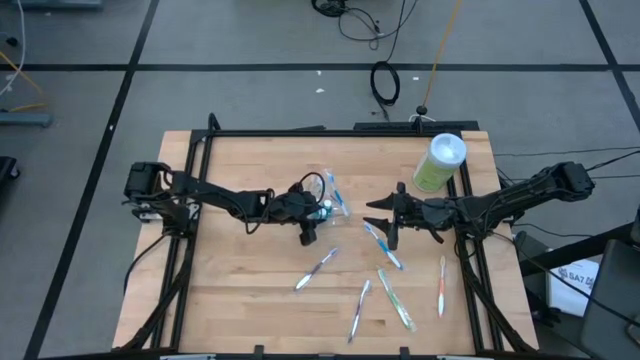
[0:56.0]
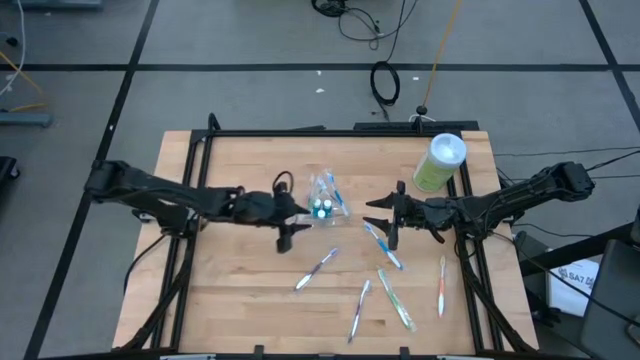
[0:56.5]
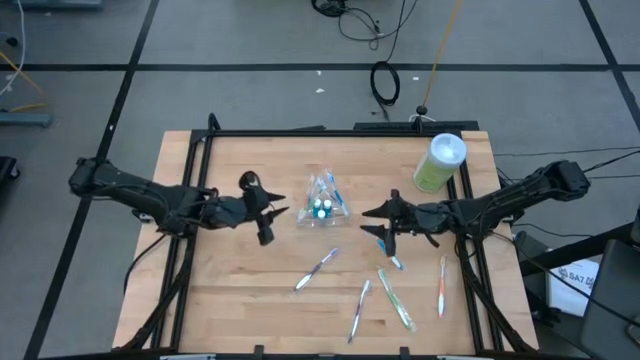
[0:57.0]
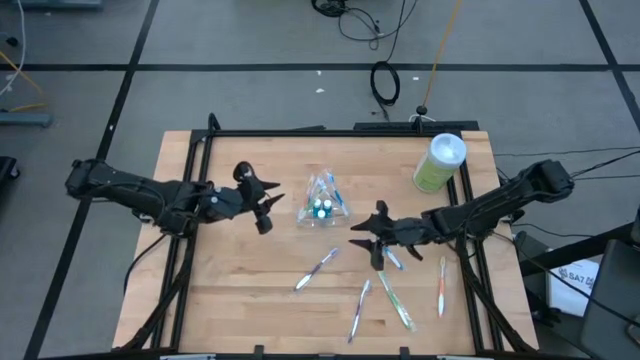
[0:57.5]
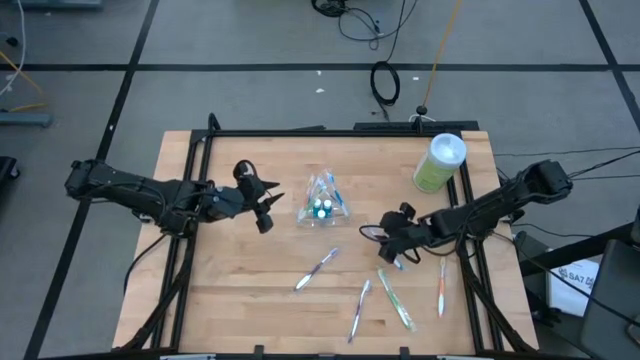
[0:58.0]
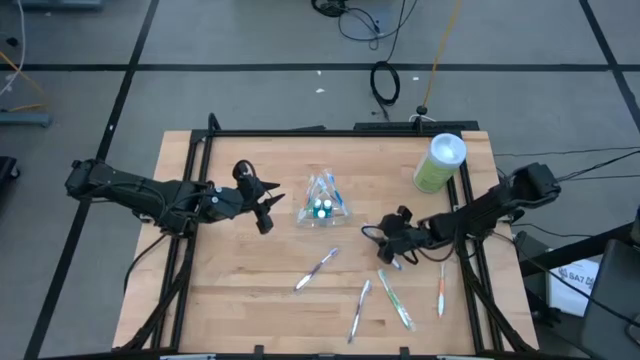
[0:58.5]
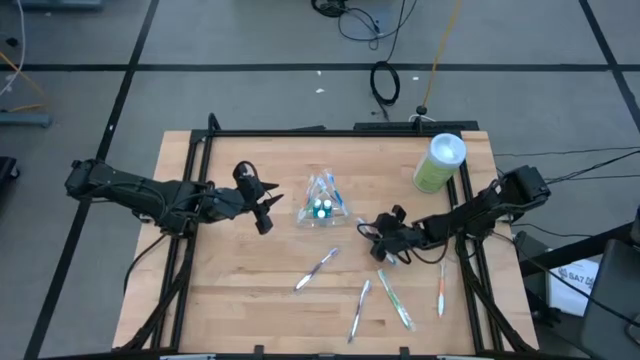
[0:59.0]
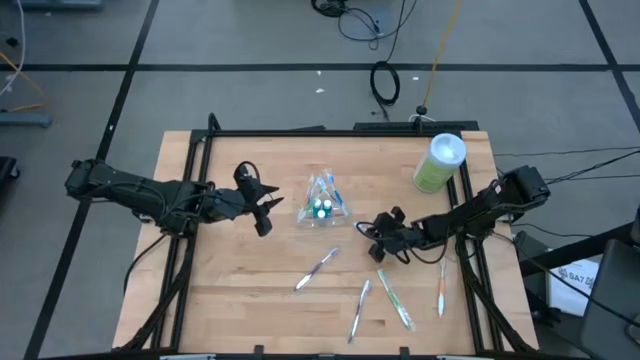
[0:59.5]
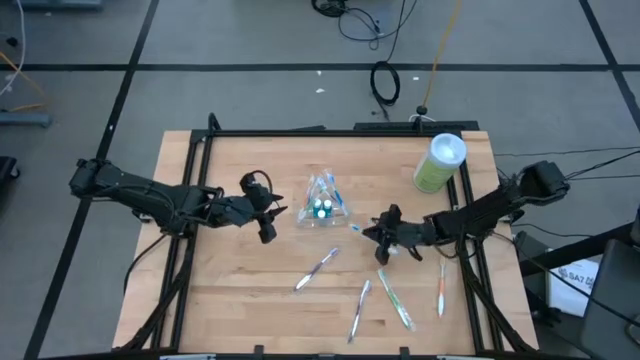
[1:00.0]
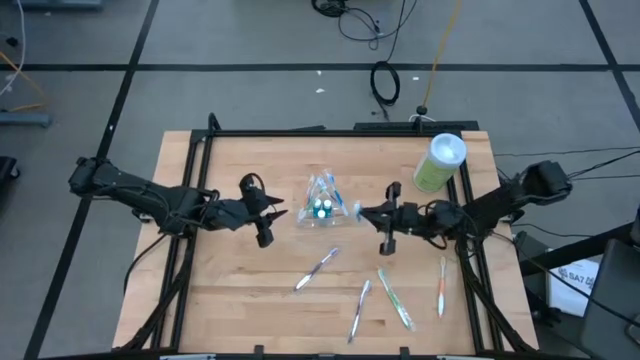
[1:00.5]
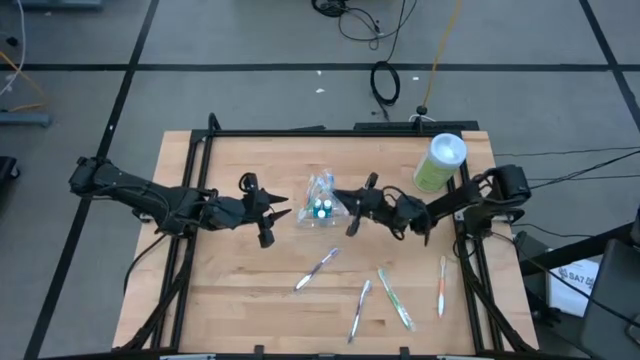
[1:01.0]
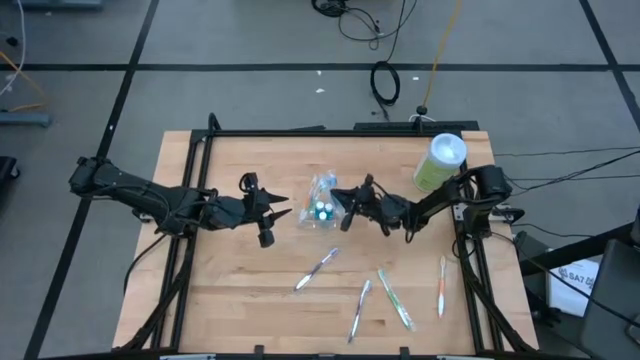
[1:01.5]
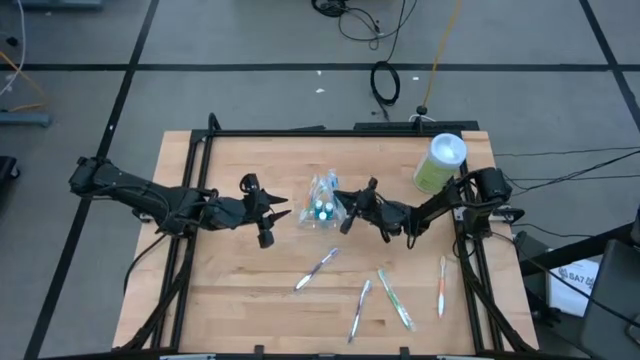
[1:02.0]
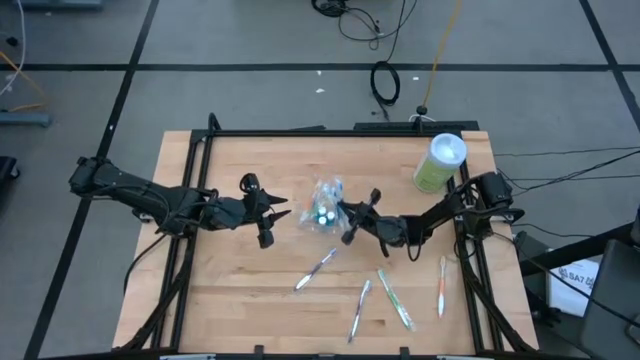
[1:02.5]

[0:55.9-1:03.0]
Task: Pick & Place toothbrushing station
Put the blue toothbrush into the transparent organizer

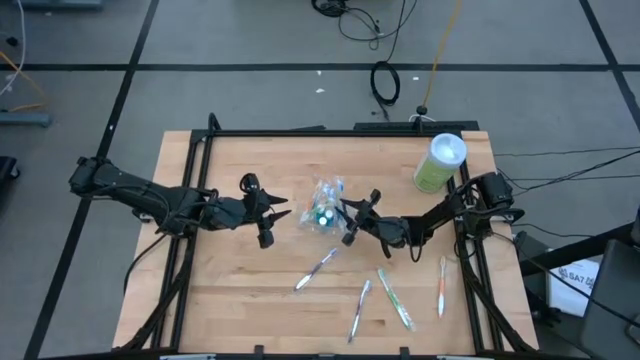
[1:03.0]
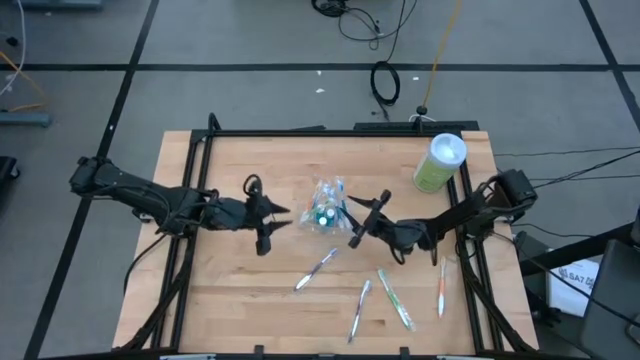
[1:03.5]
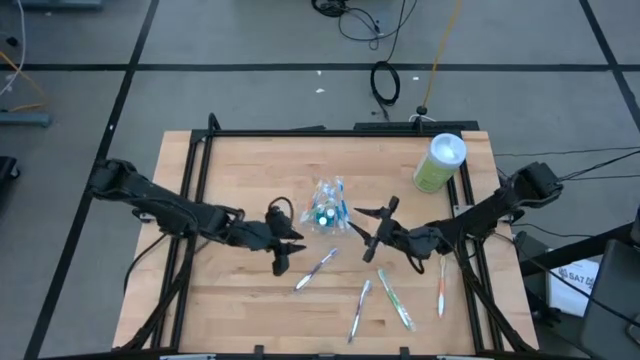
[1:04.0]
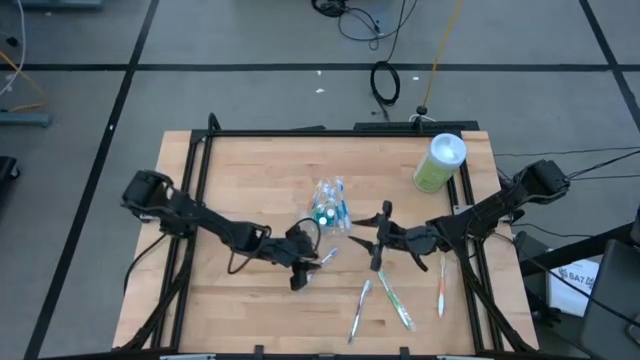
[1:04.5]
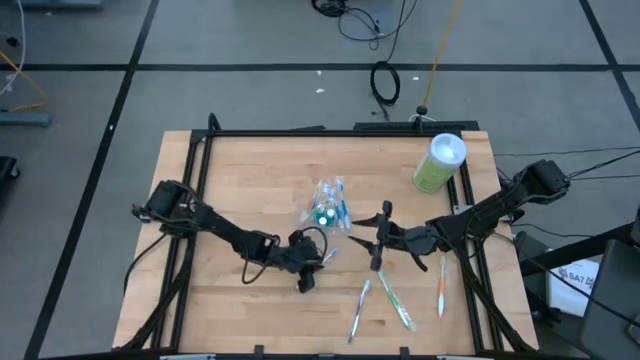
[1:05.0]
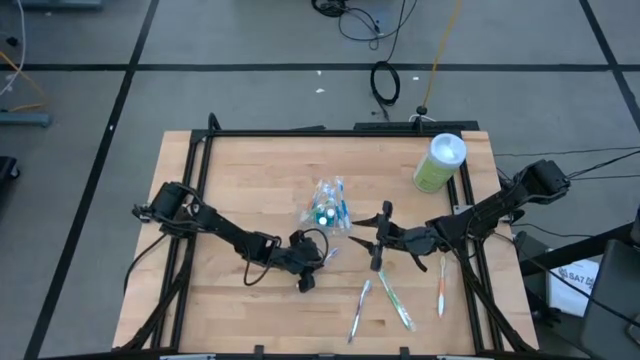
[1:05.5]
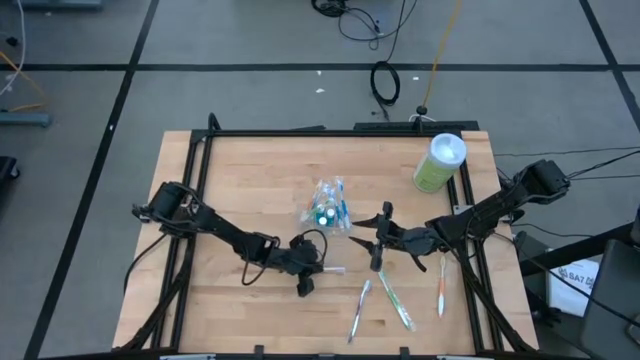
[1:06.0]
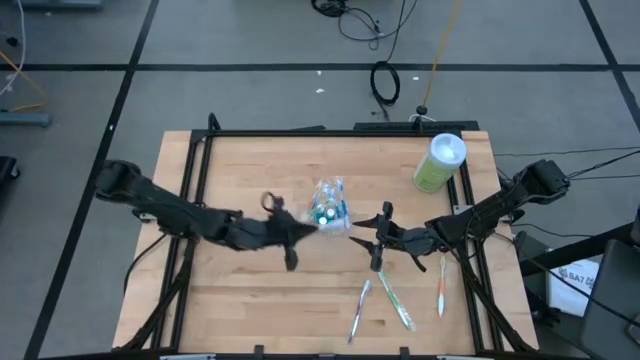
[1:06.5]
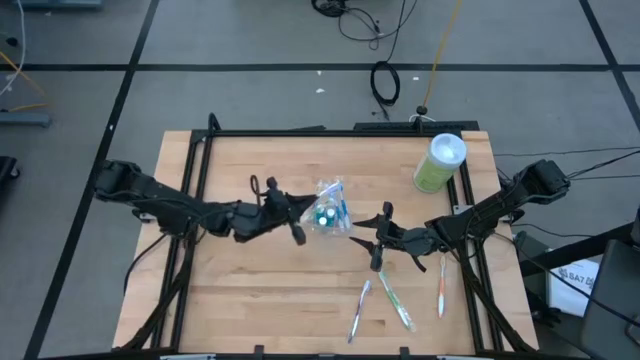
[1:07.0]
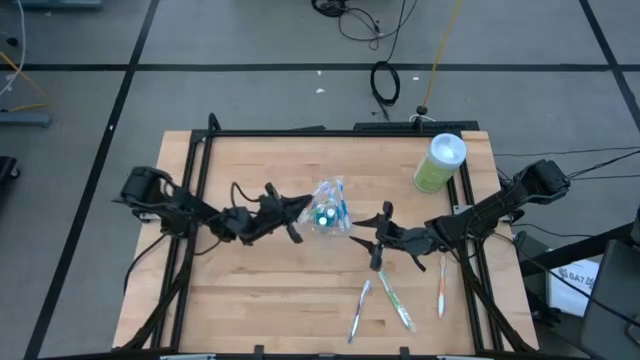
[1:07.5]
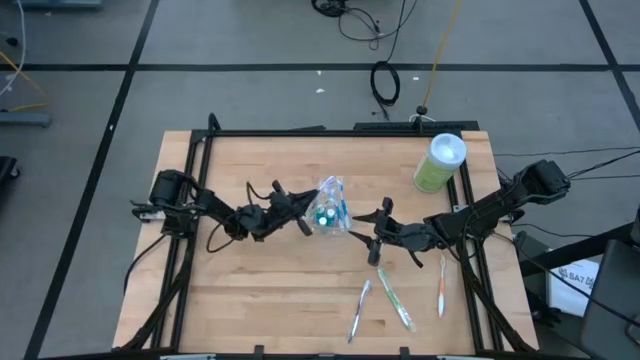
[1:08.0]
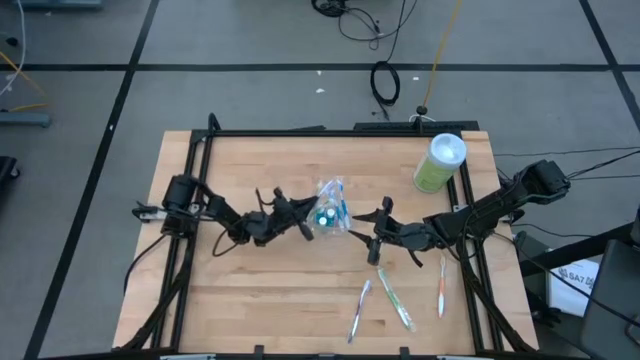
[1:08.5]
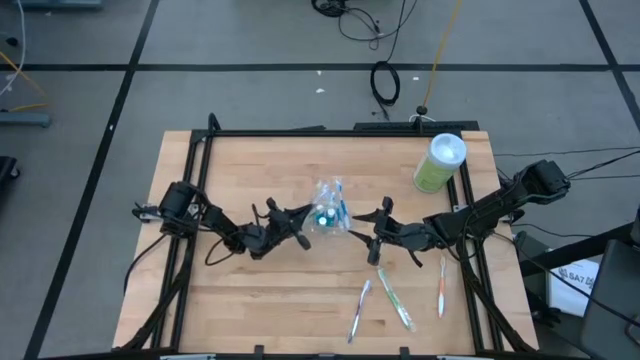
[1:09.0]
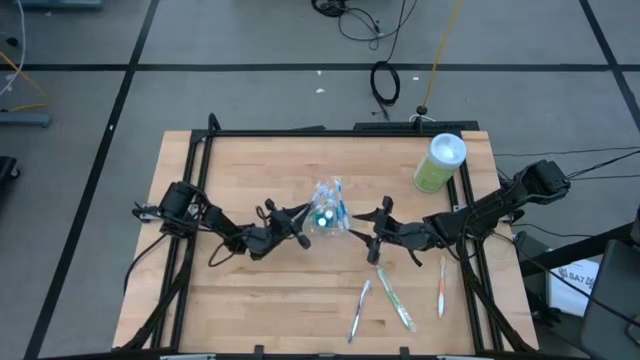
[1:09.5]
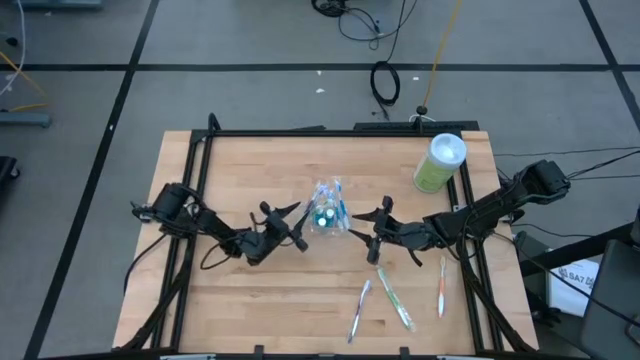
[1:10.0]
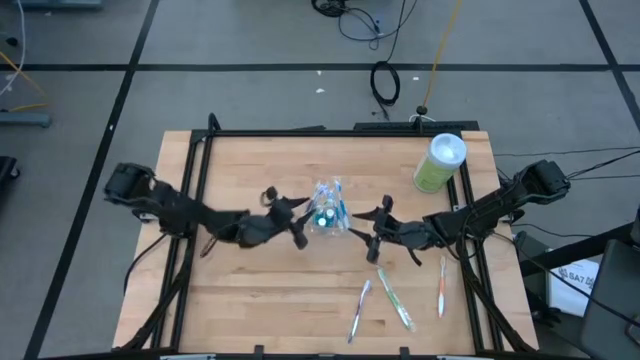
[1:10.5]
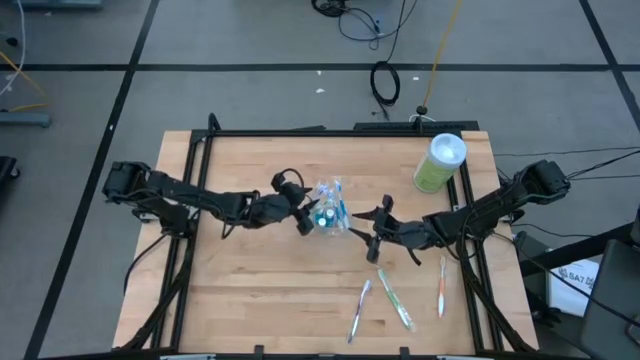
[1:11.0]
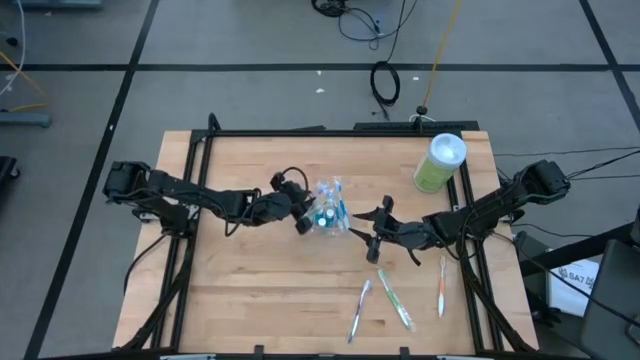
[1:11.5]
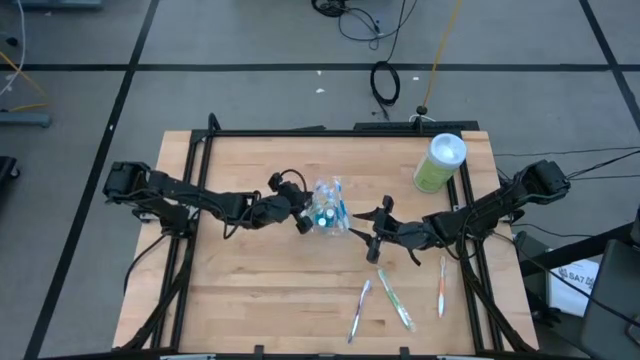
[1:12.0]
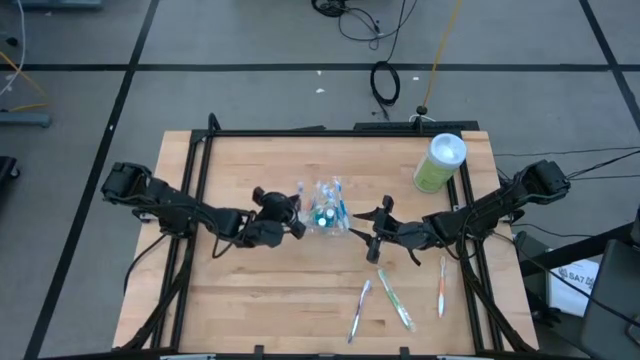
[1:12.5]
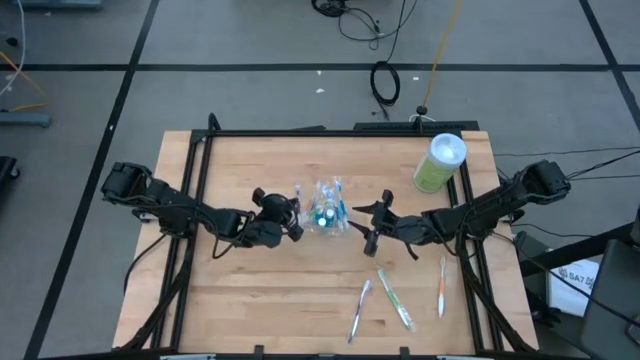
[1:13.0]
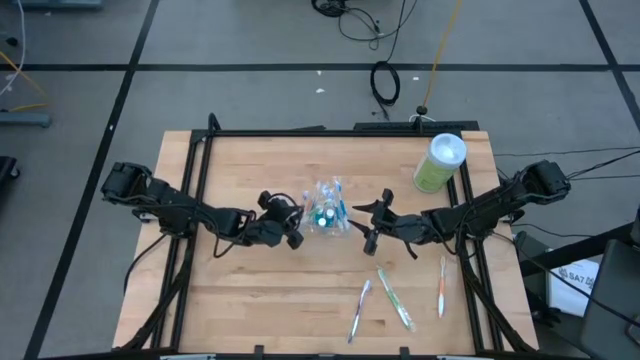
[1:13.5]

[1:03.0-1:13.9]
Put the top purple toothbrush into the transparent organizer

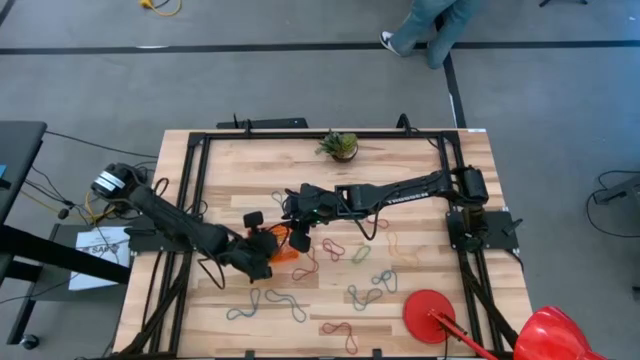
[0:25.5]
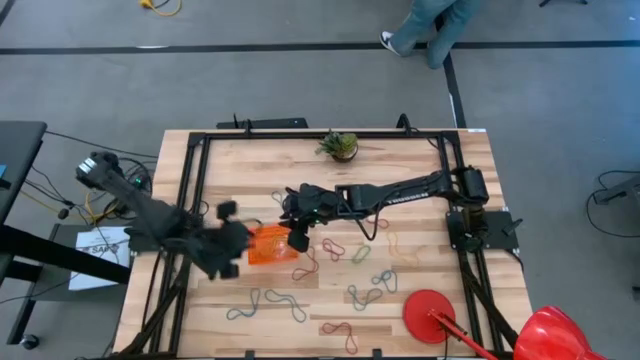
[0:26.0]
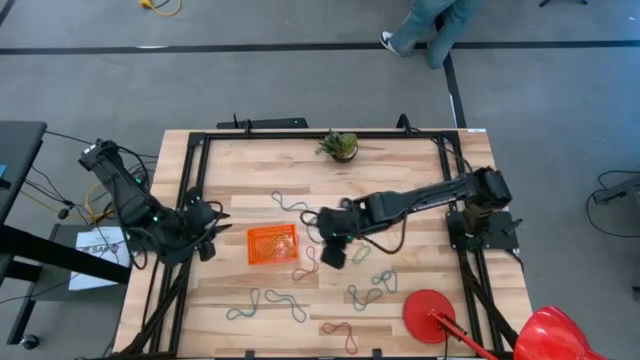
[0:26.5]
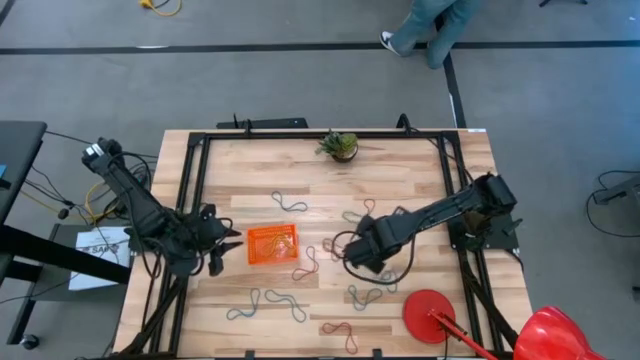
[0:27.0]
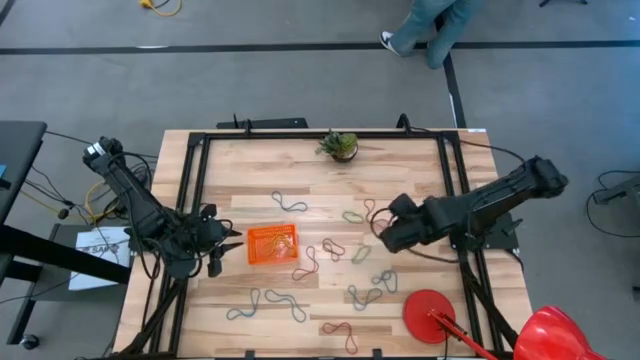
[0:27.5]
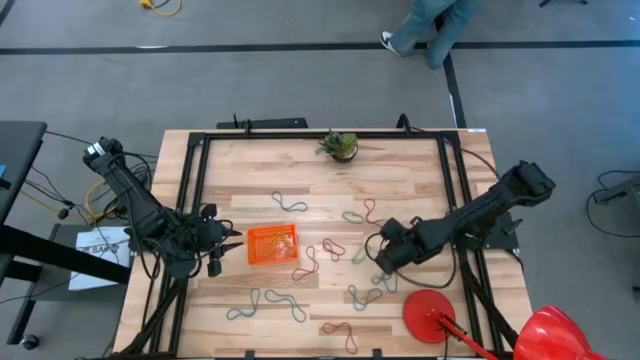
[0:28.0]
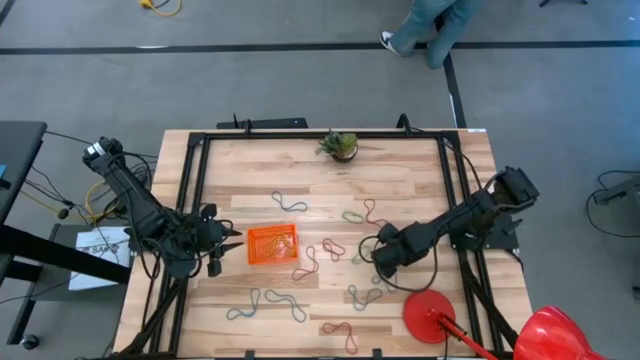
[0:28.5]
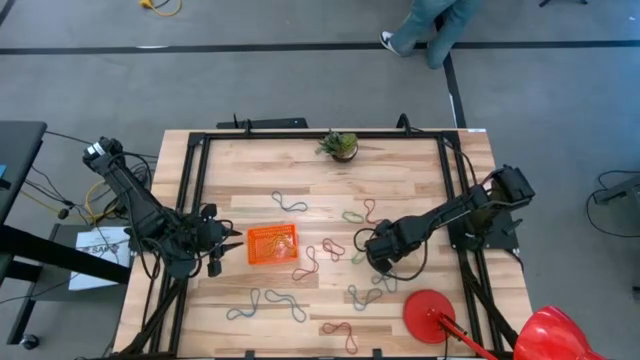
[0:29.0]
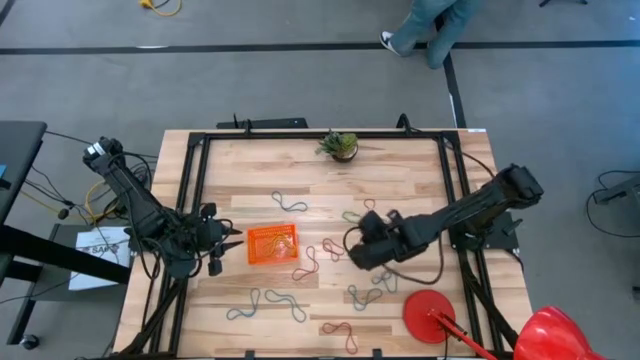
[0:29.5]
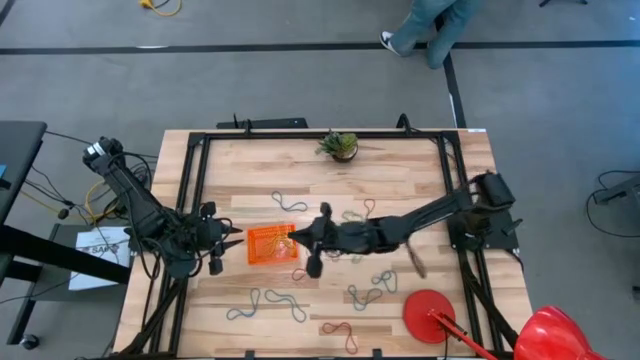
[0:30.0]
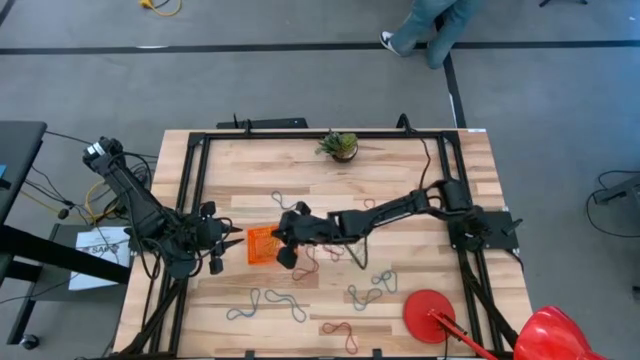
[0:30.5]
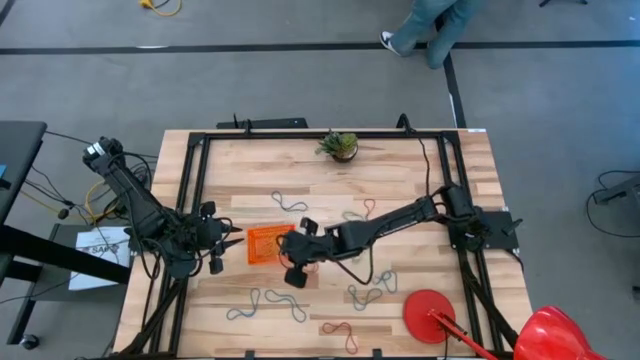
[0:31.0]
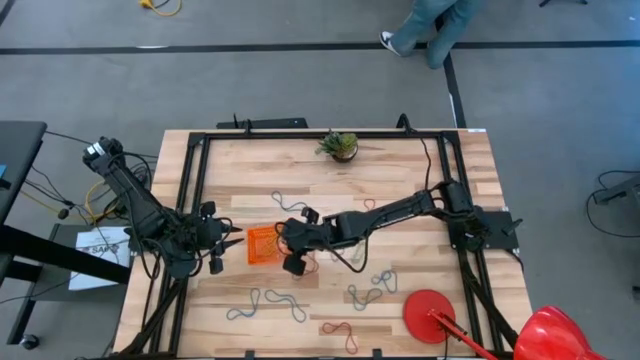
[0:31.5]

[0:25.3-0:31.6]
Task: Pick and place rubber bands into bin
Put the yellow rubber band into the orange container
